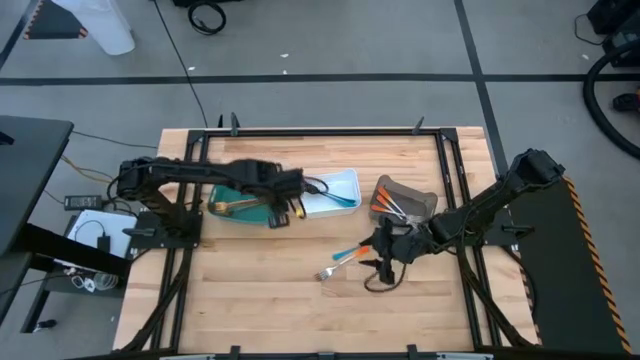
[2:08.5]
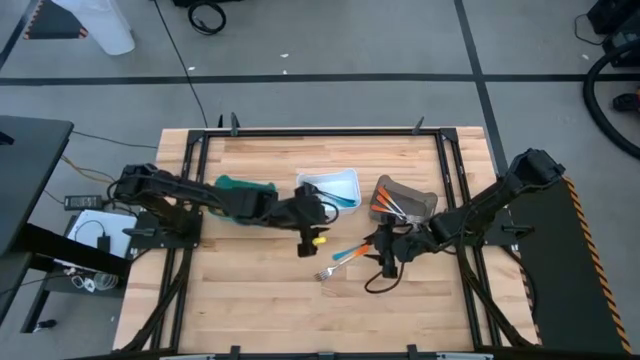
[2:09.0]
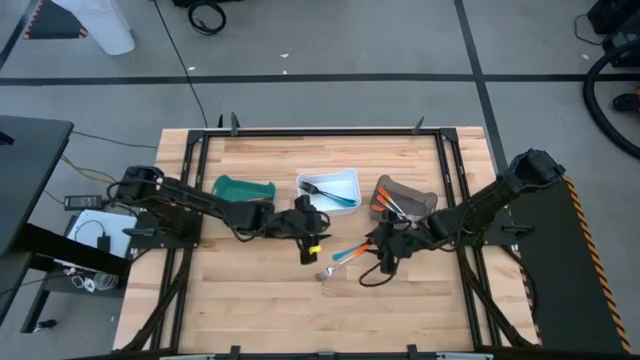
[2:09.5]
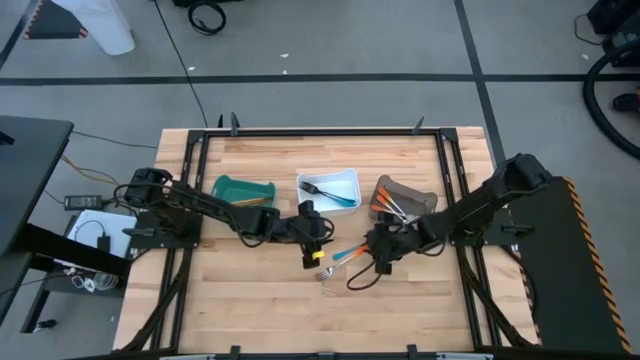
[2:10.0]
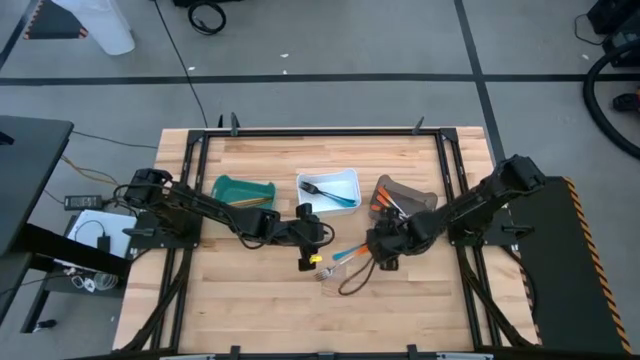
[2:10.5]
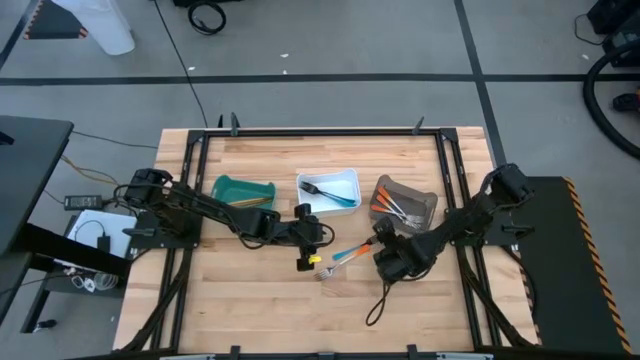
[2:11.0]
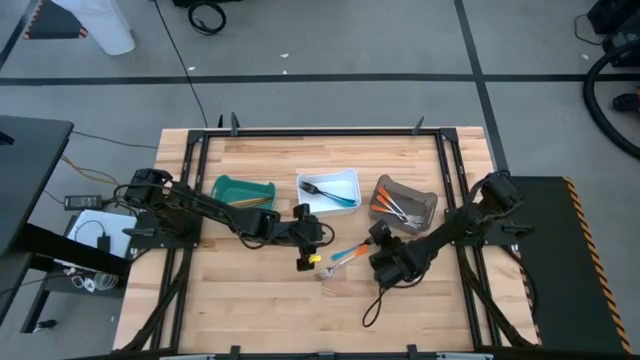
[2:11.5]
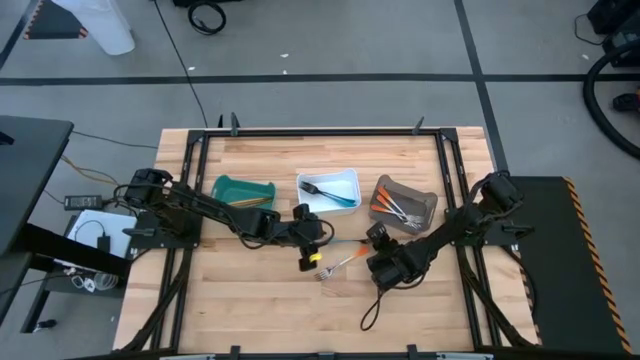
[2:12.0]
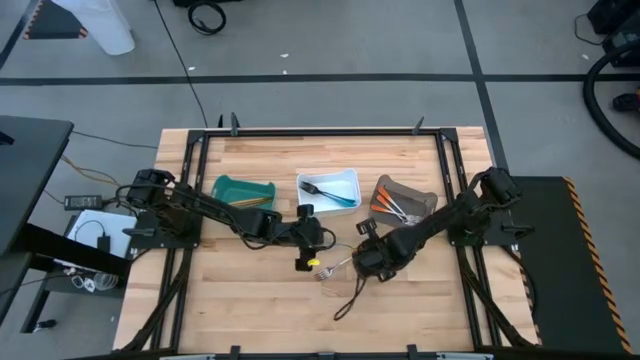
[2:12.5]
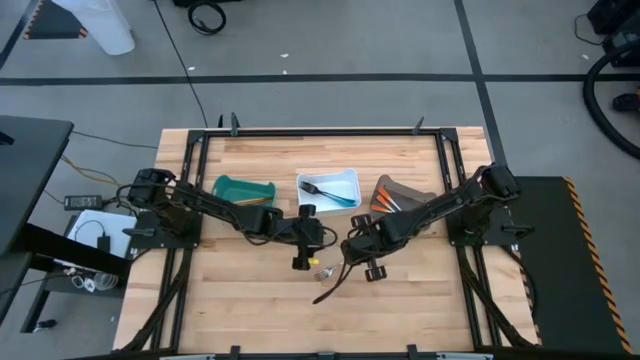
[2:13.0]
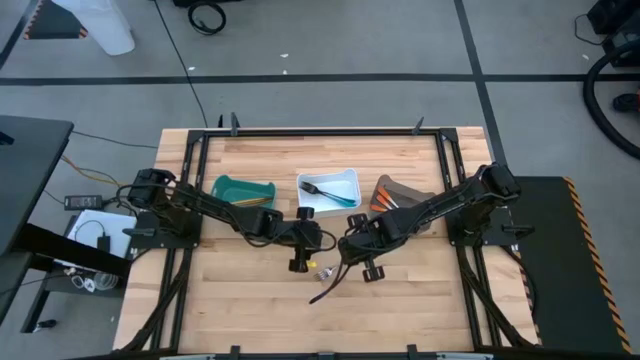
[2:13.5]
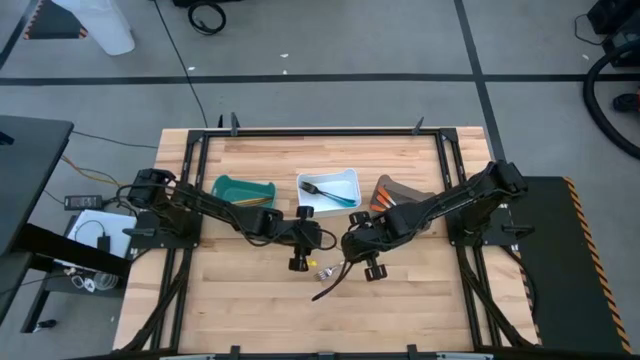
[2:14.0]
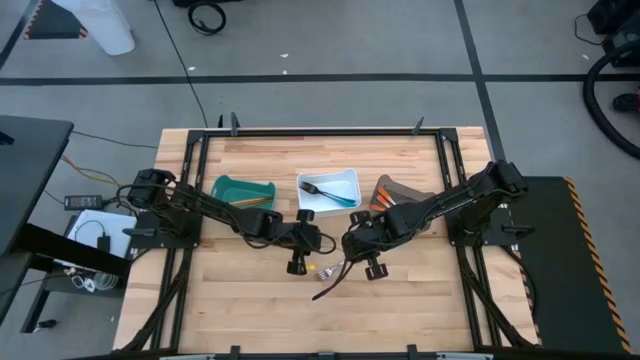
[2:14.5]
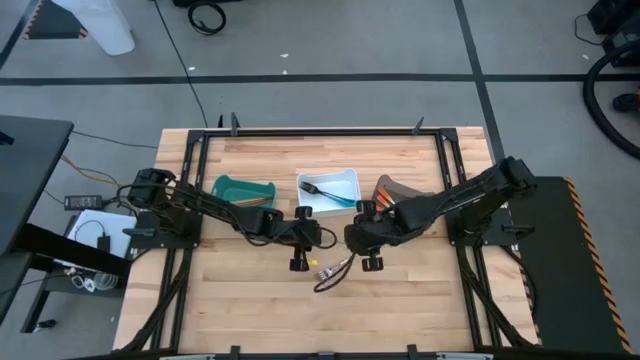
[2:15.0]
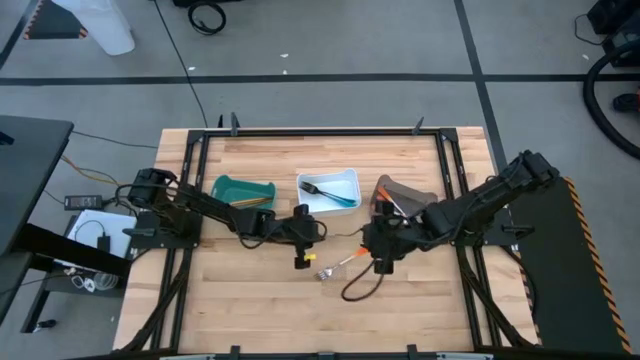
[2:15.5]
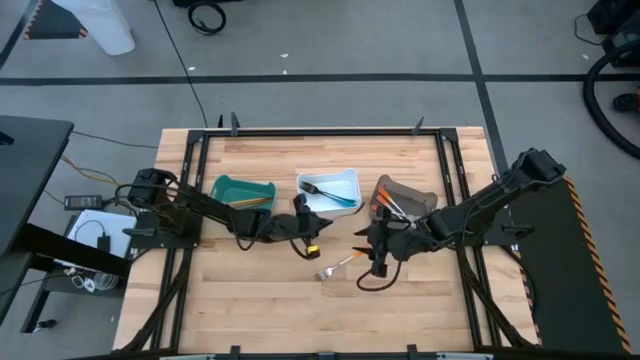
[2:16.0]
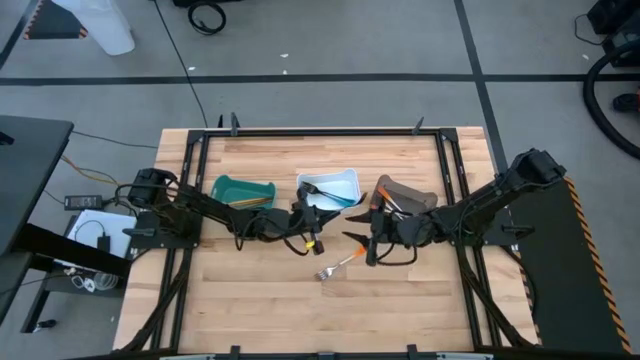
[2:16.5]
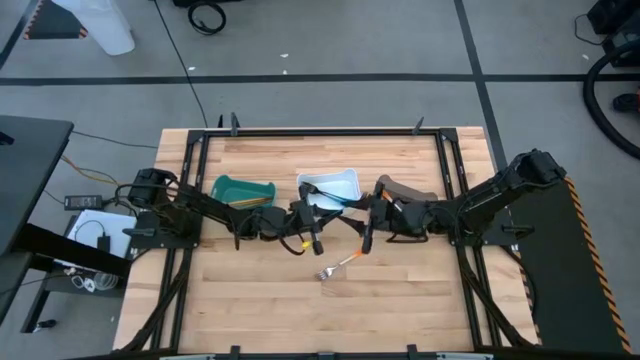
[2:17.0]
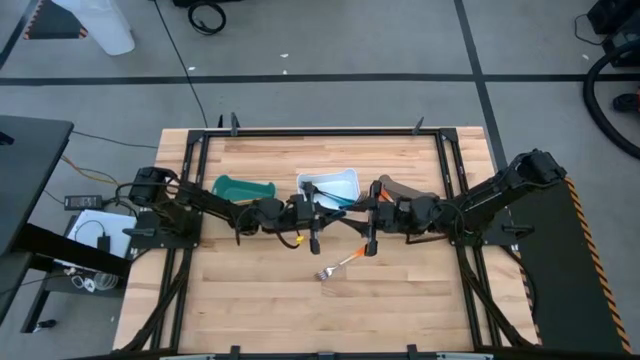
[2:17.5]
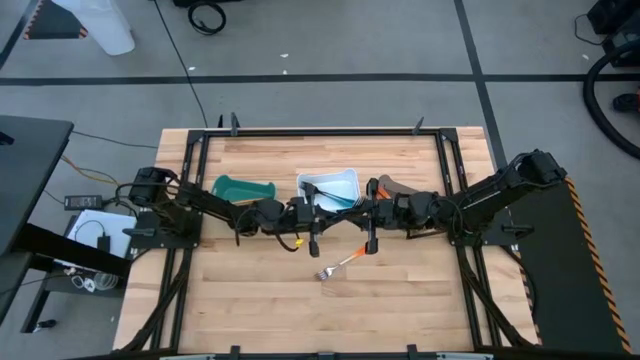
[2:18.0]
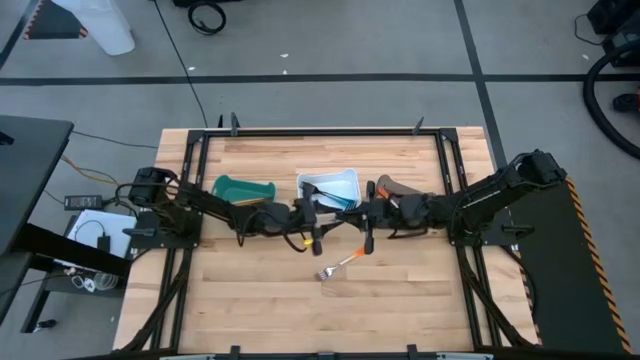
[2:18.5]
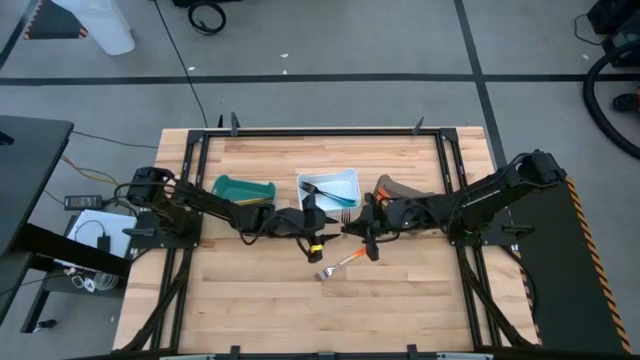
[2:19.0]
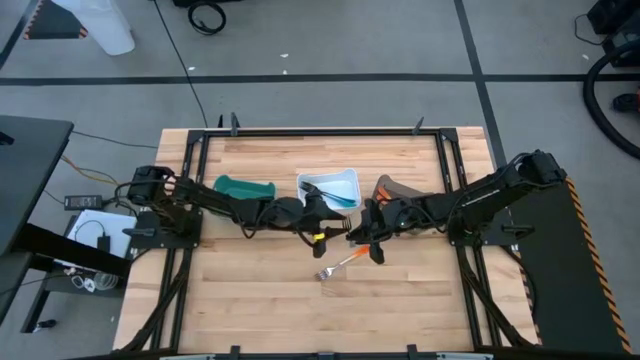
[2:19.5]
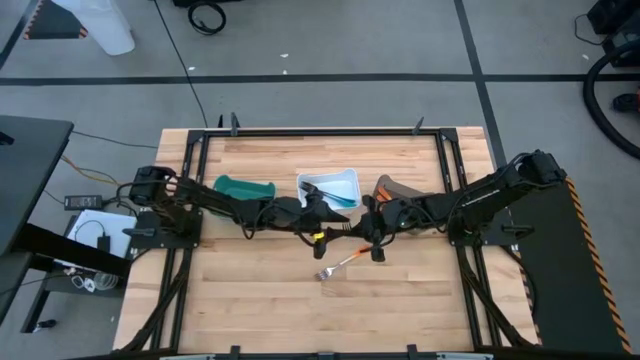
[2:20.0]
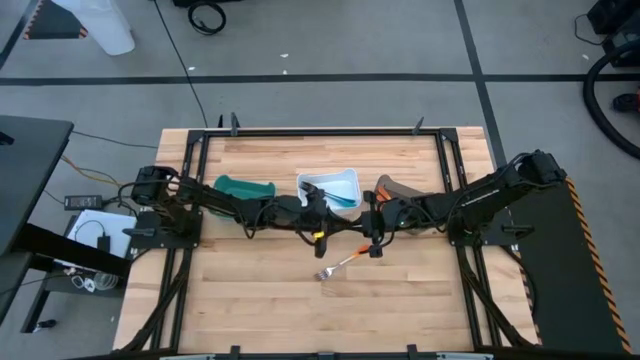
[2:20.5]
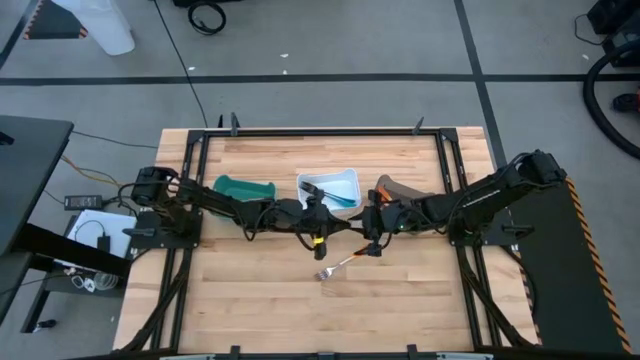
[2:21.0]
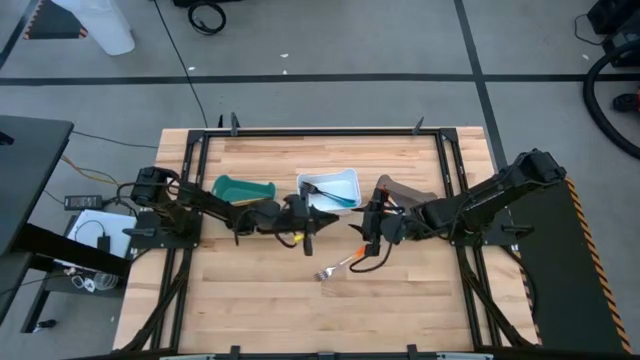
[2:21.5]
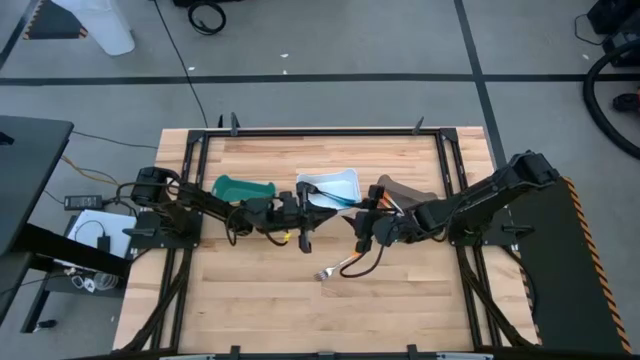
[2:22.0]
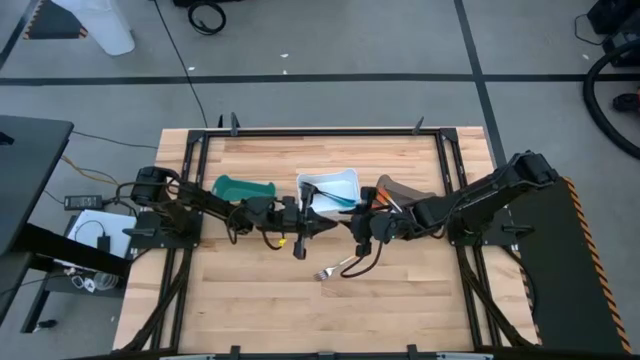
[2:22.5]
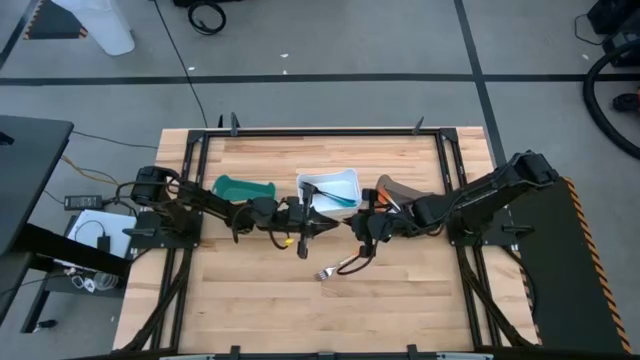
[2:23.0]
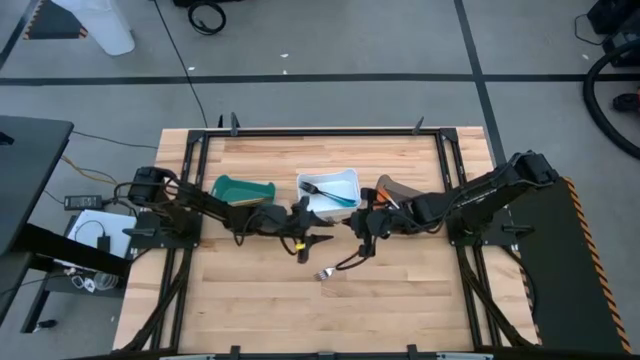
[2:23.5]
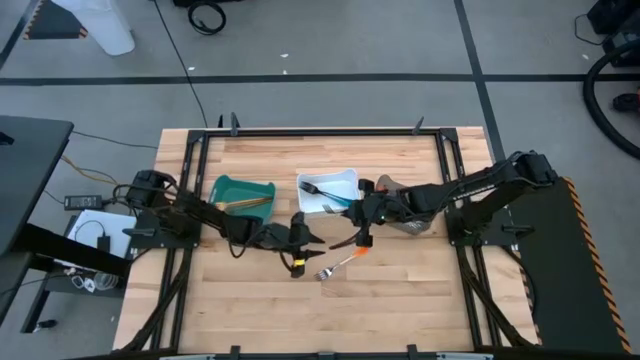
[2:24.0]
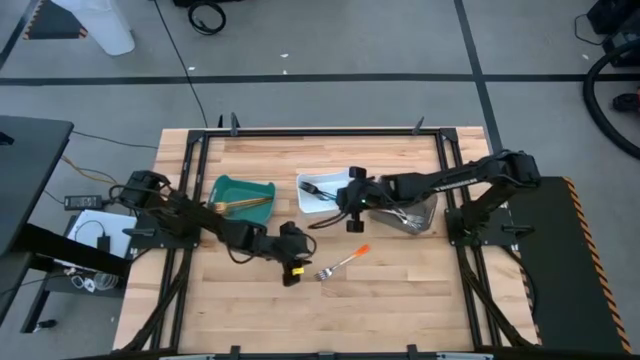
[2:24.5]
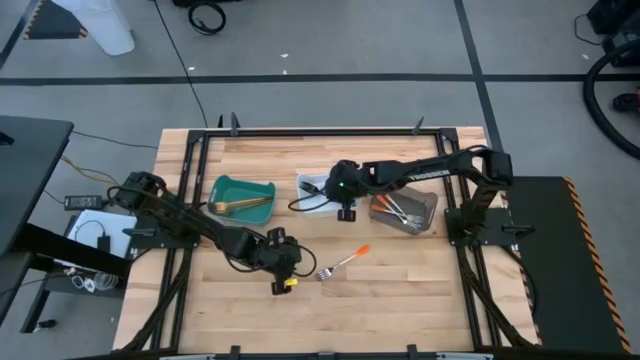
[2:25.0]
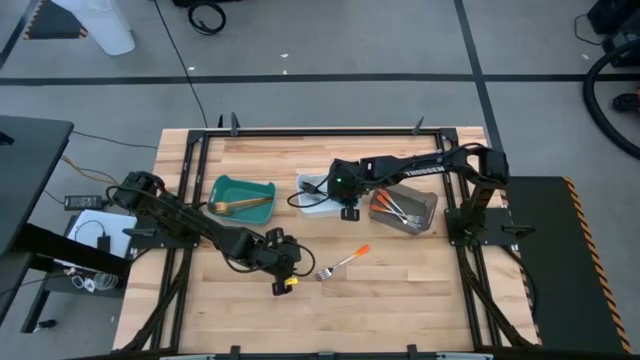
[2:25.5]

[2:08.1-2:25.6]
Task: Sort silverware by color (type)
Put the blue fork into the white bin

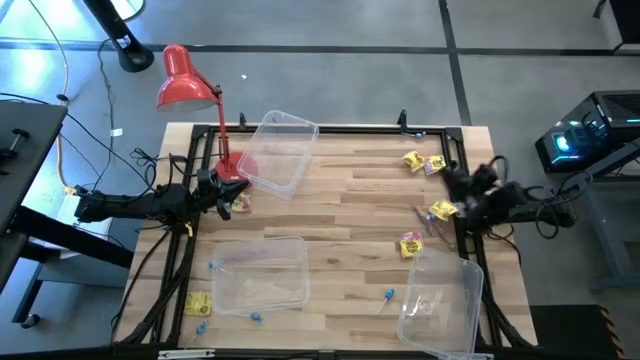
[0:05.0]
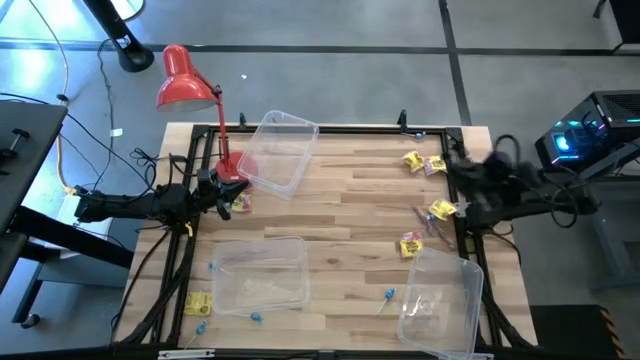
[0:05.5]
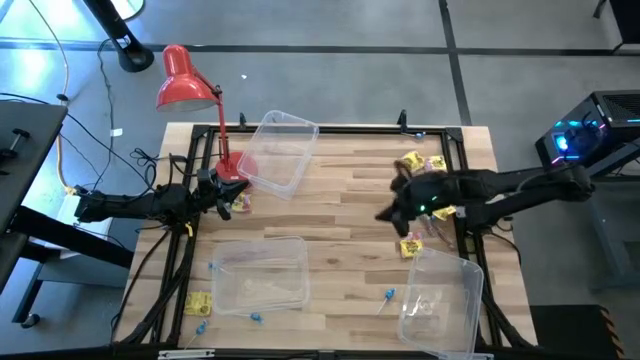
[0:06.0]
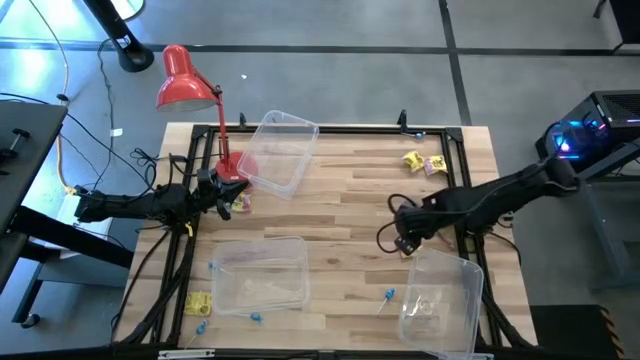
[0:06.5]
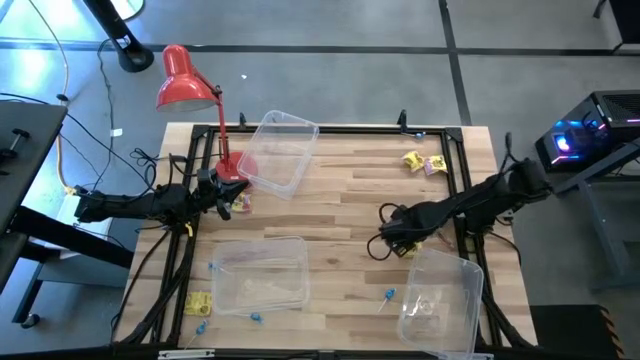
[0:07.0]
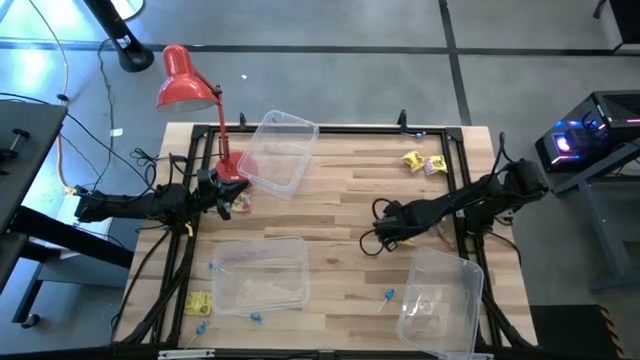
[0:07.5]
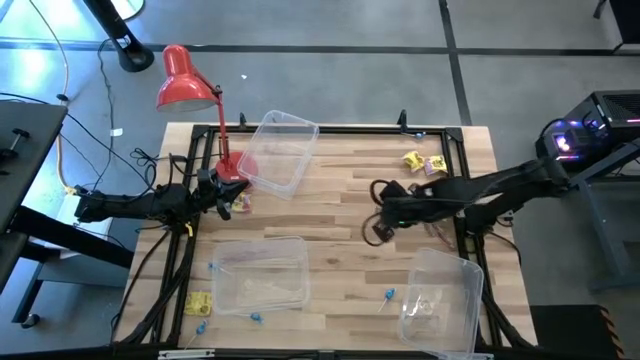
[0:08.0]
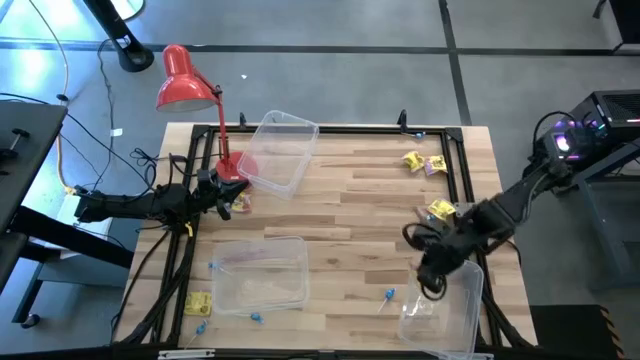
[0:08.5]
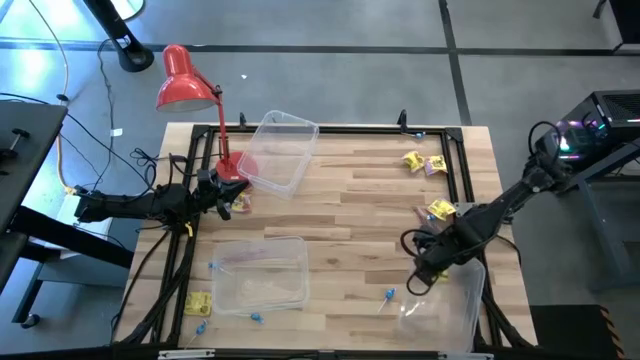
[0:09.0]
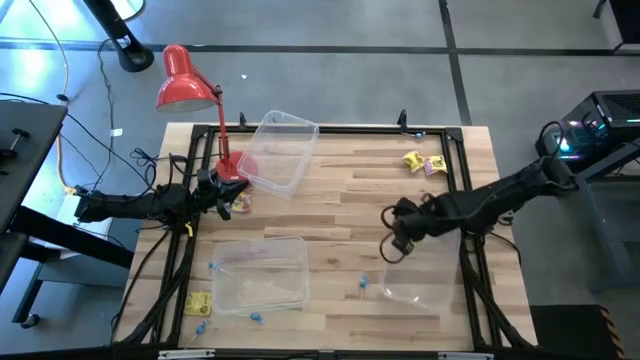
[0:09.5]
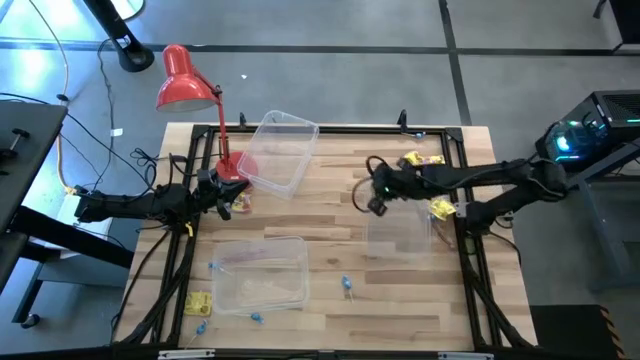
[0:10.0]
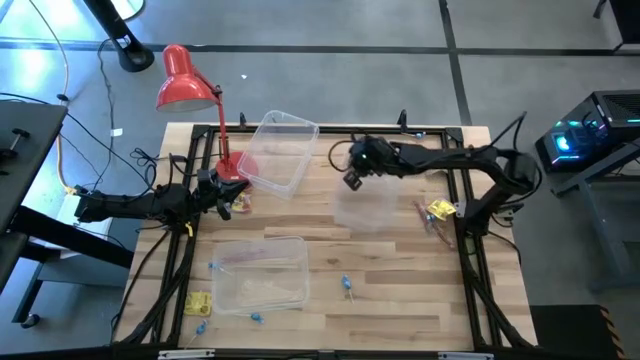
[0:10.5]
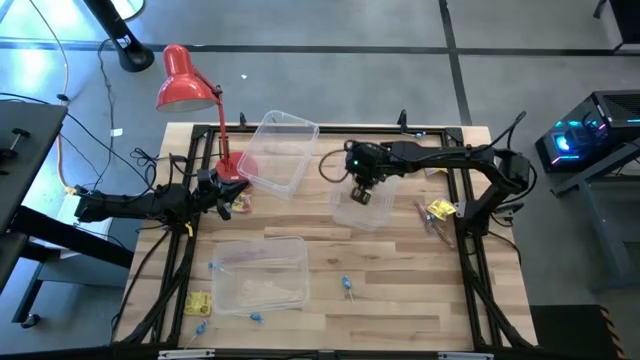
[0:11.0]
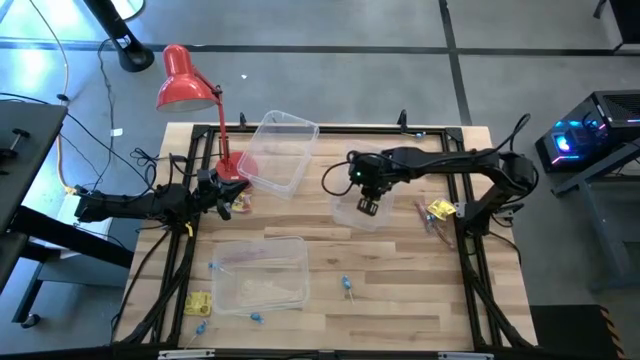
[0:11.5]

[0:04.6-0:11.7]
Task: Sort candy
Put the yellow candy into the top right transparent bin
